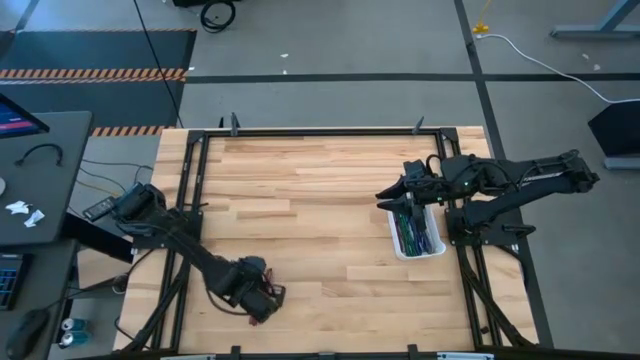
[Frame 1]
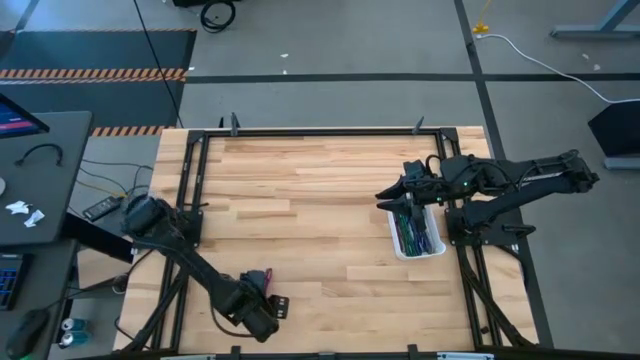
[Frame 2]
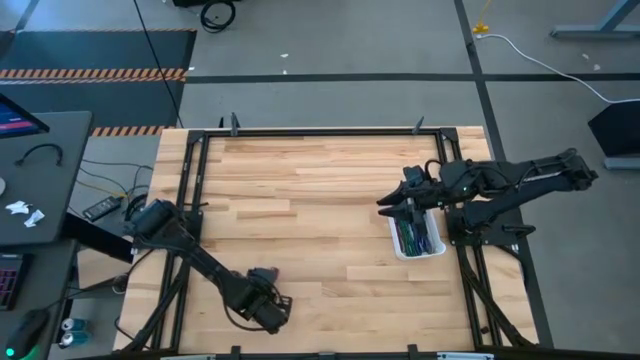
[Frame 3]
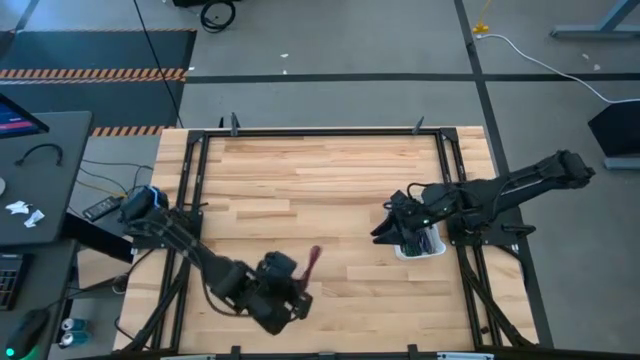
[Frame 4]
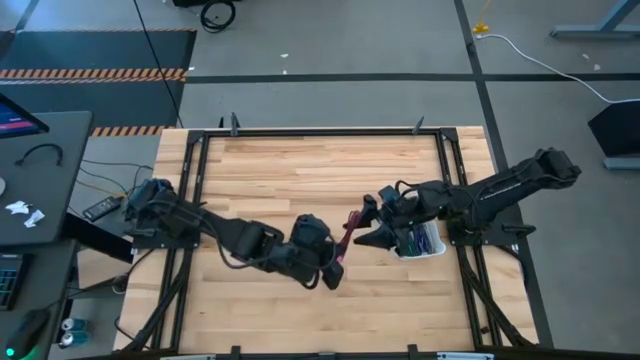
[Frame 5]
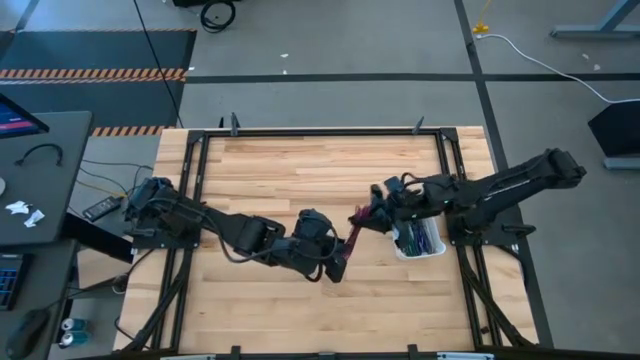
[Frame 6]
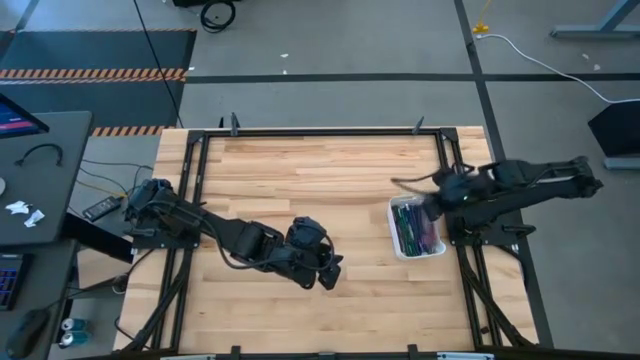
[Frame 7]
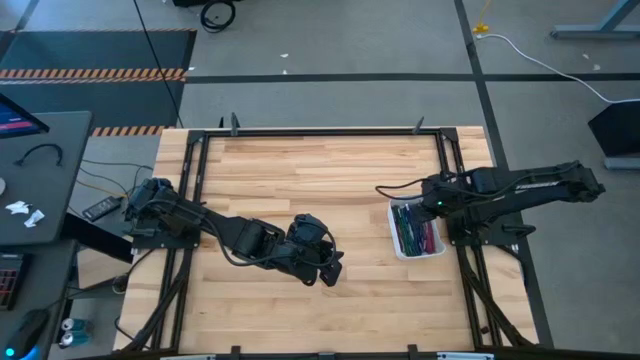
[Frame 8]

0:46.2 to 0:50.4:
Task: Pick and place USB-C Cables
Put the red charging cable into the white bin

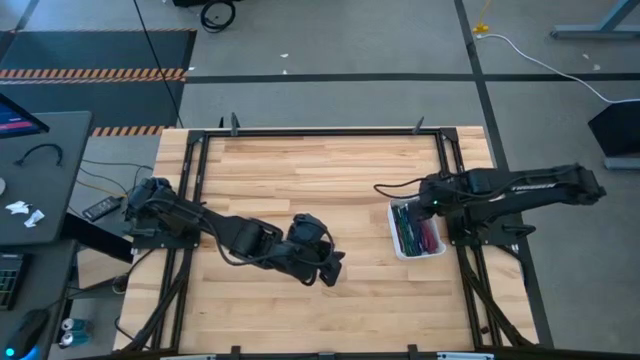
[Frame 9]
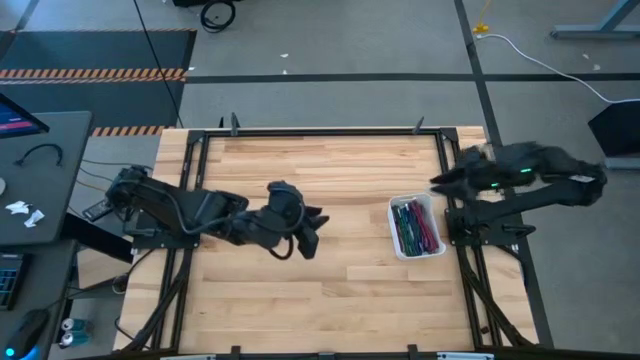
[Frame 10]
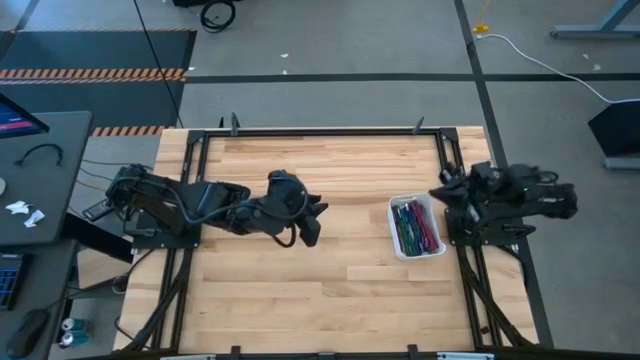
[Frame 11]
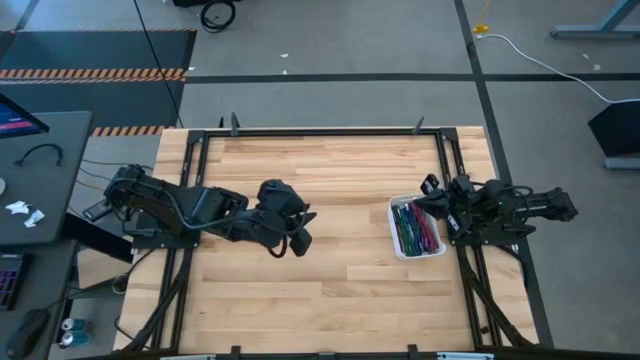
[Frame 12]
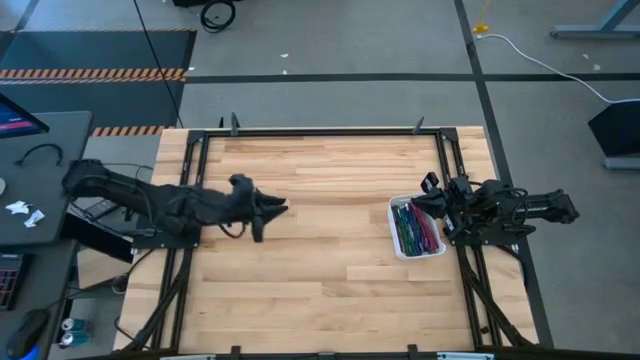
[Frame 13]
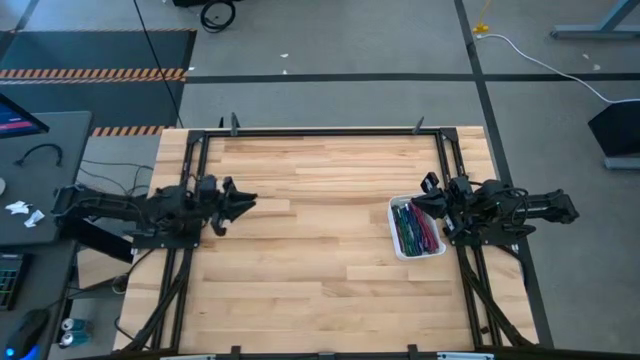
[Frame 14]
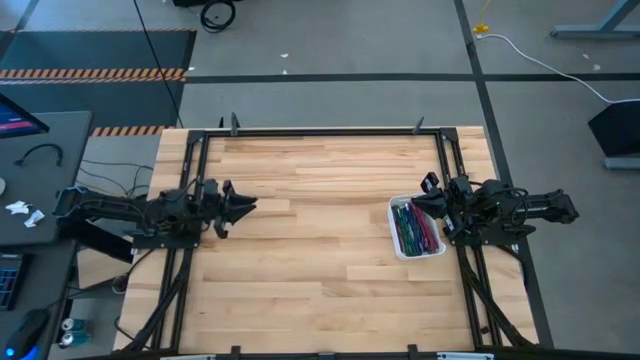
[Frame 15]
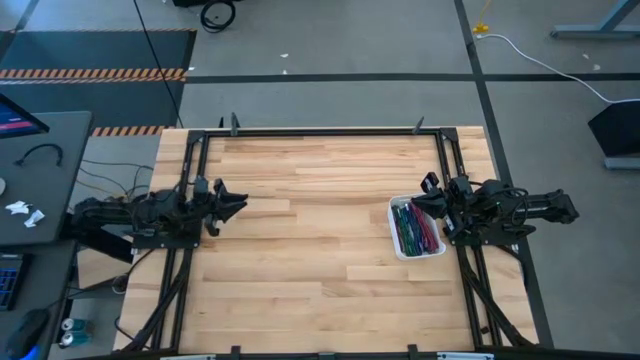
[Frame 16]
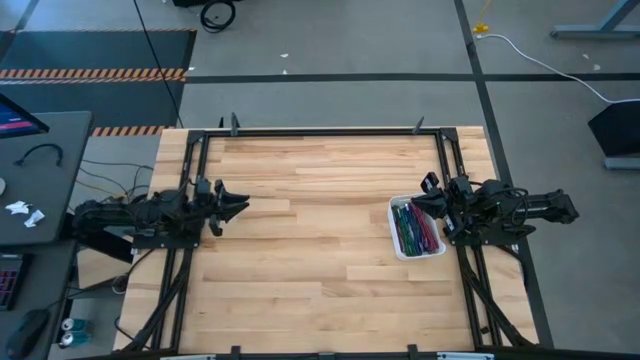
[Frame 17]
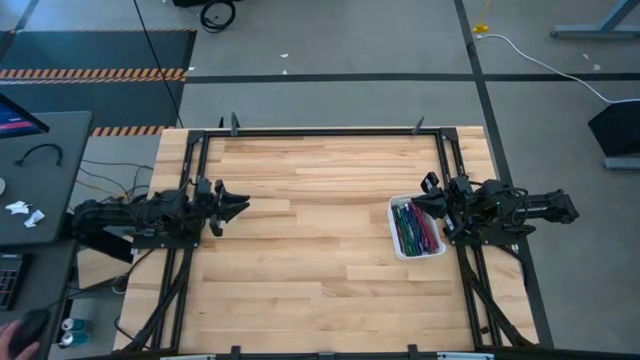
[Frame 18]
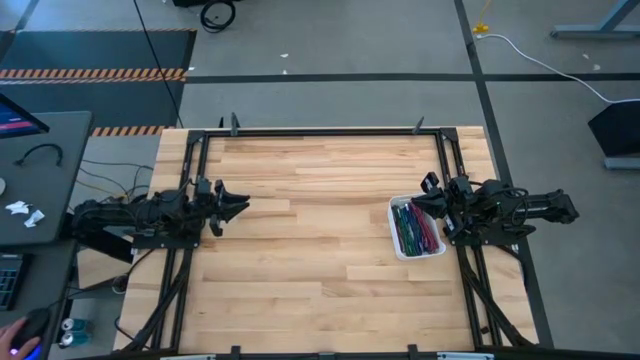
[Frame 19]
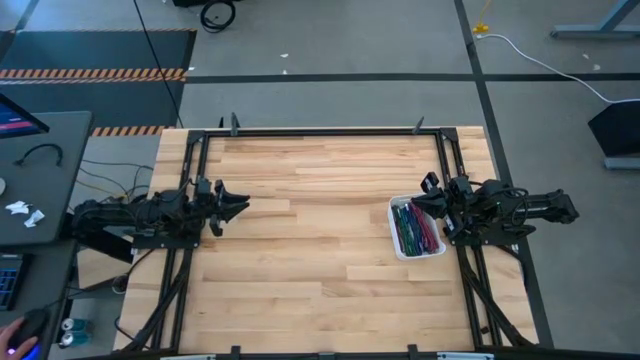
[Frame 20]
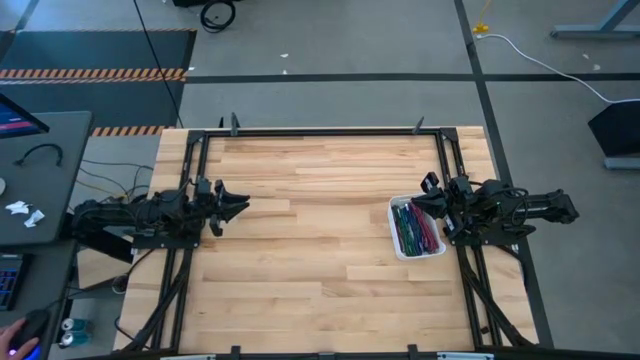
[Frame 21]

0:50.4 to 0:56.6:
Return to Home Position

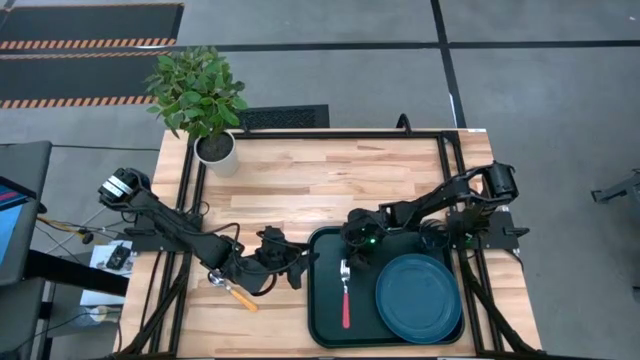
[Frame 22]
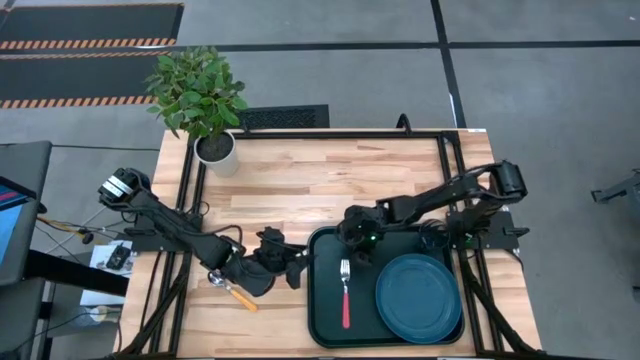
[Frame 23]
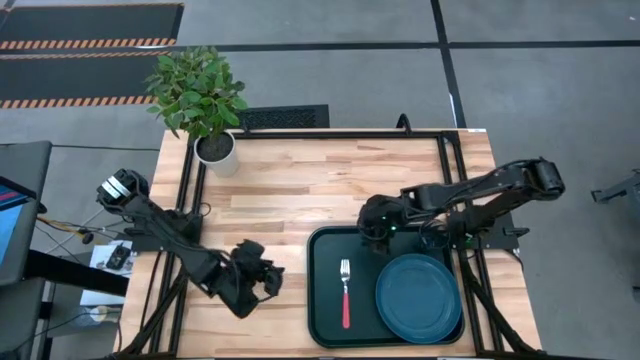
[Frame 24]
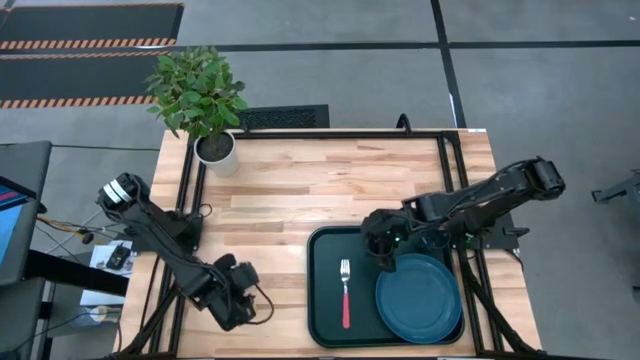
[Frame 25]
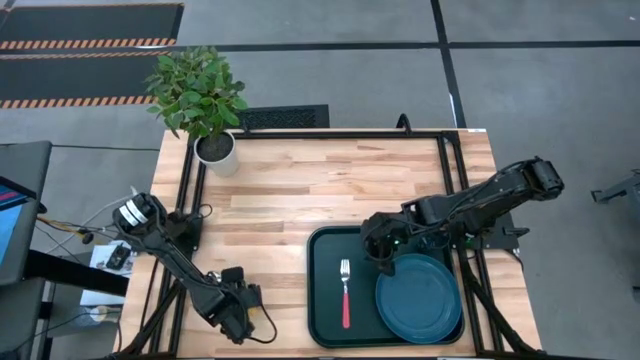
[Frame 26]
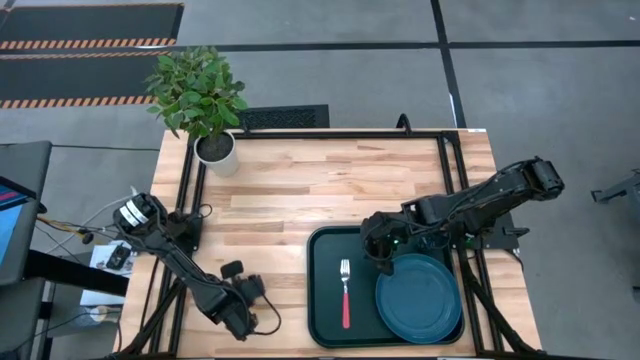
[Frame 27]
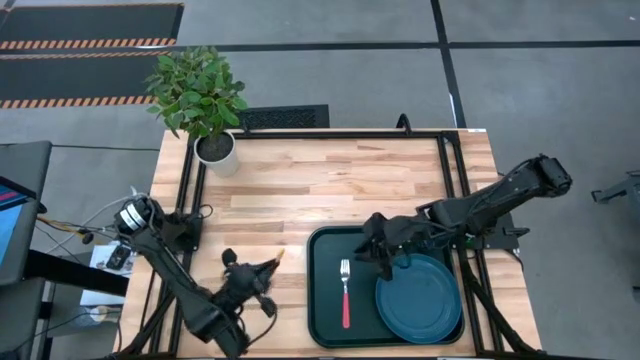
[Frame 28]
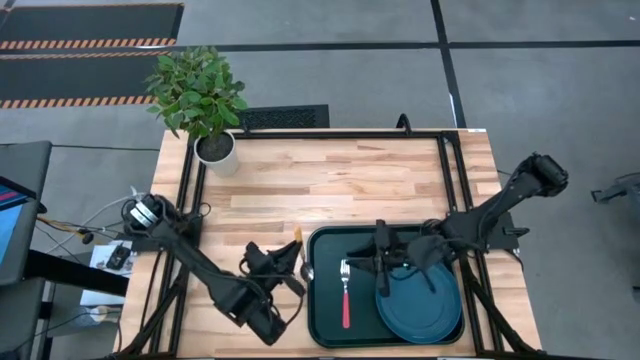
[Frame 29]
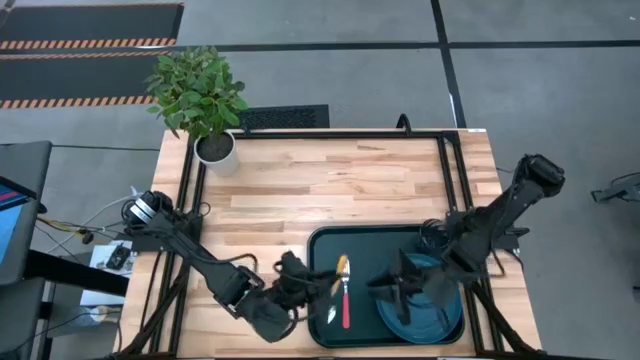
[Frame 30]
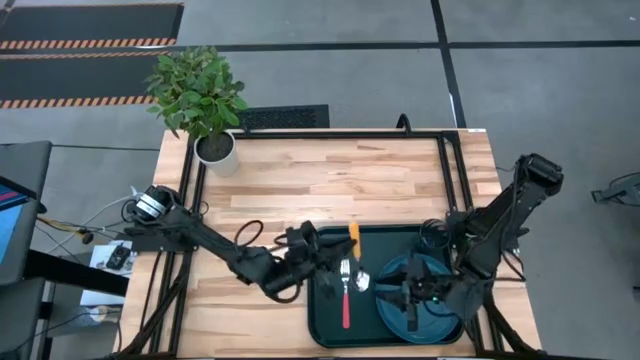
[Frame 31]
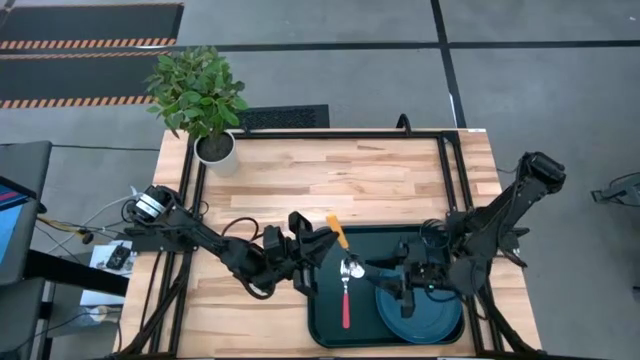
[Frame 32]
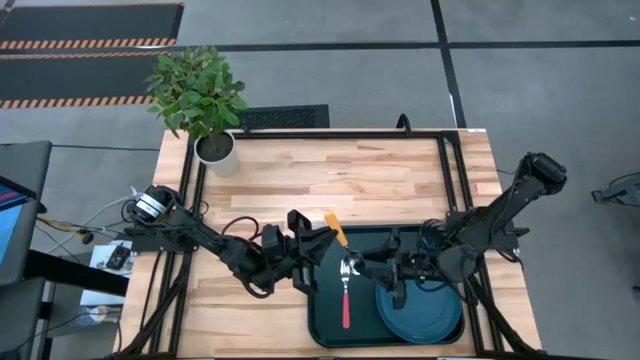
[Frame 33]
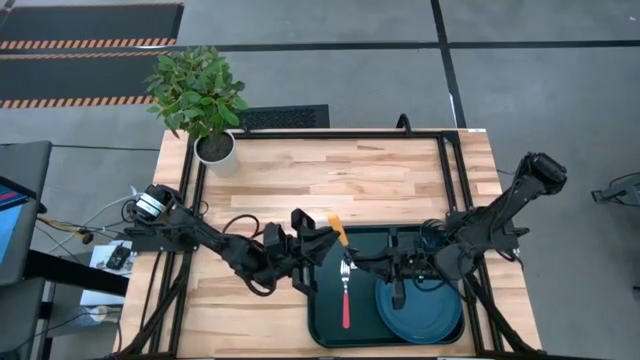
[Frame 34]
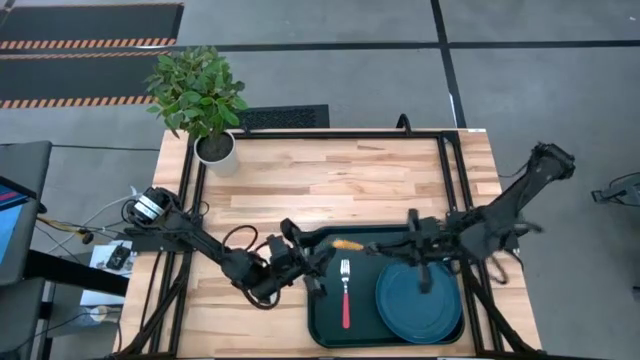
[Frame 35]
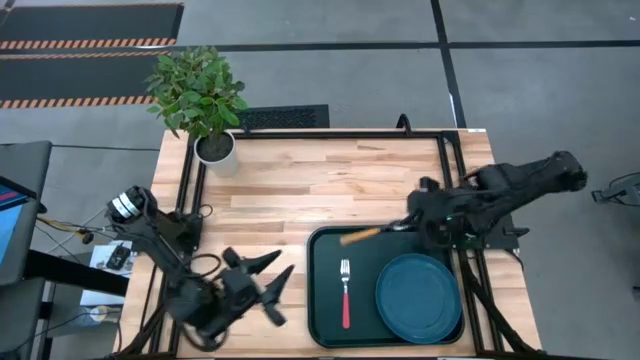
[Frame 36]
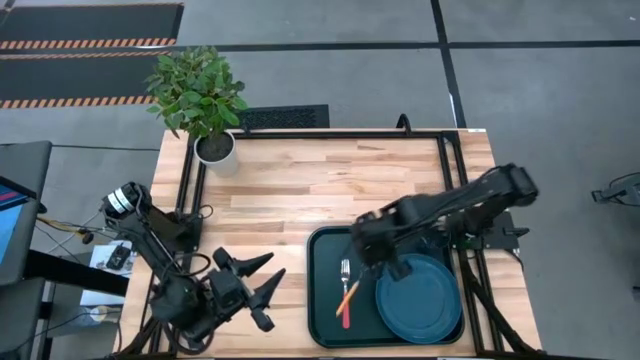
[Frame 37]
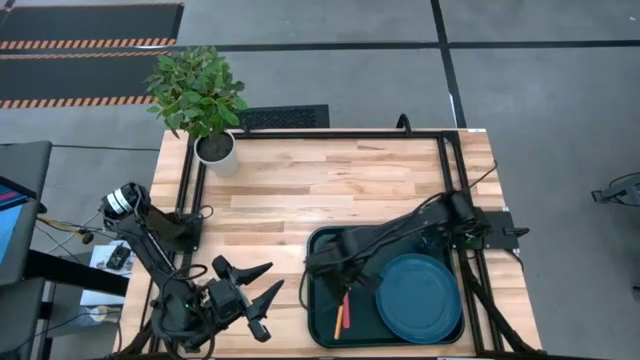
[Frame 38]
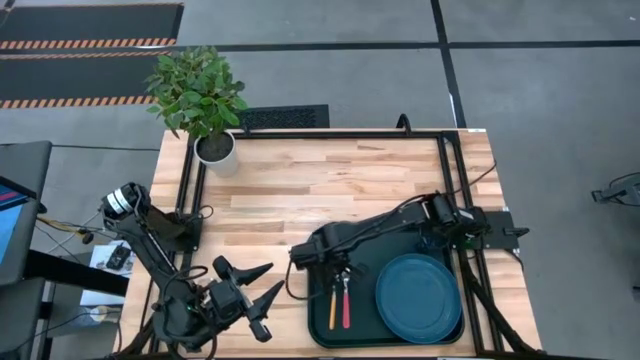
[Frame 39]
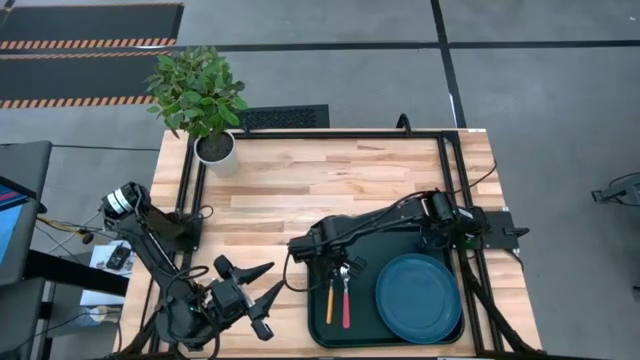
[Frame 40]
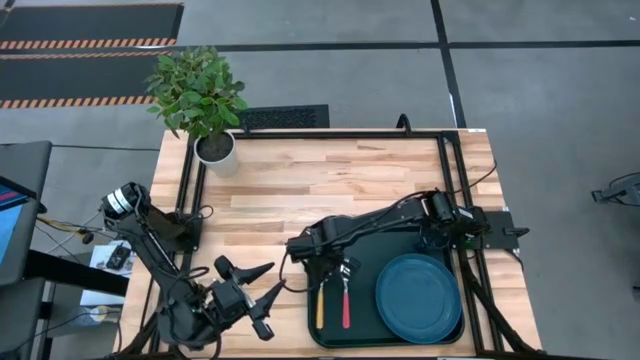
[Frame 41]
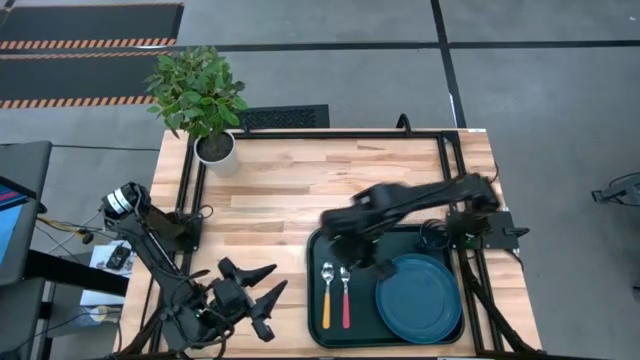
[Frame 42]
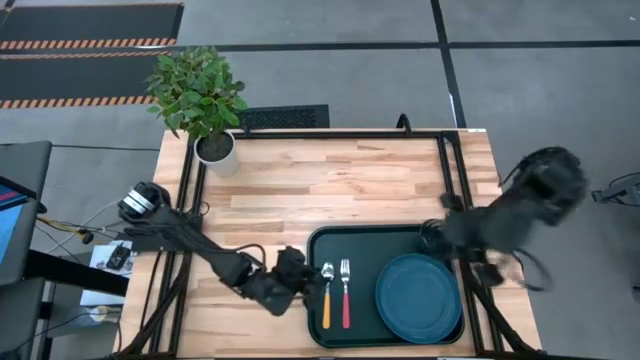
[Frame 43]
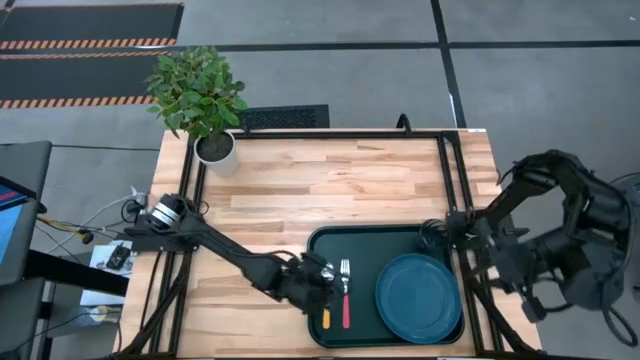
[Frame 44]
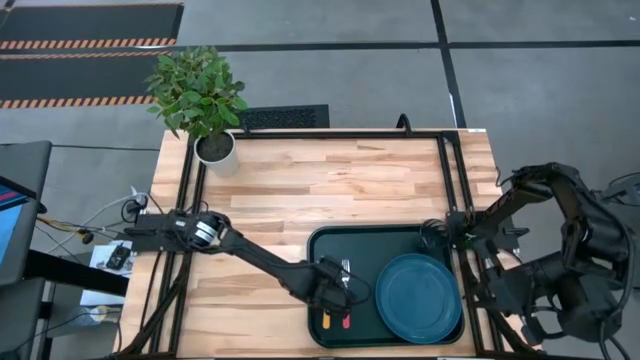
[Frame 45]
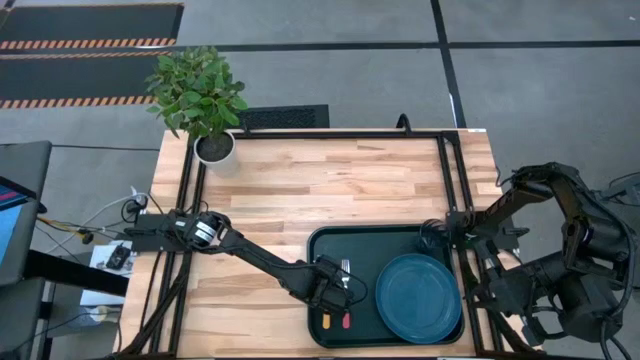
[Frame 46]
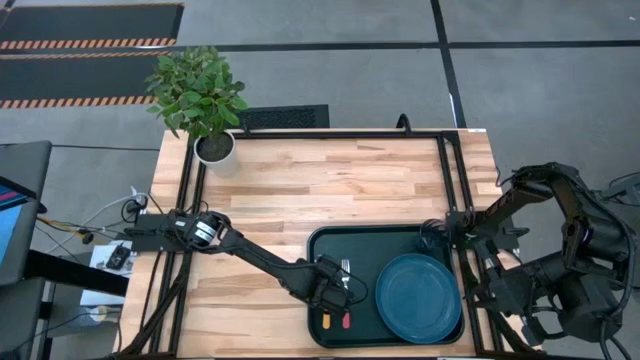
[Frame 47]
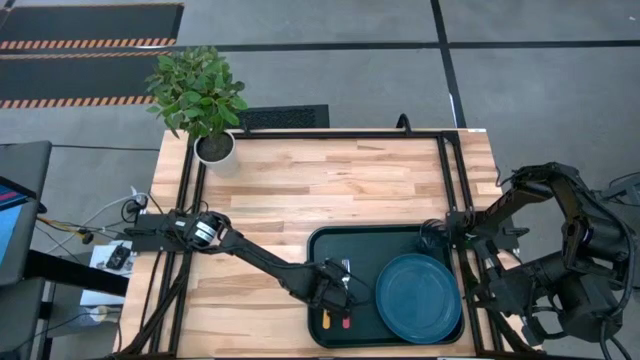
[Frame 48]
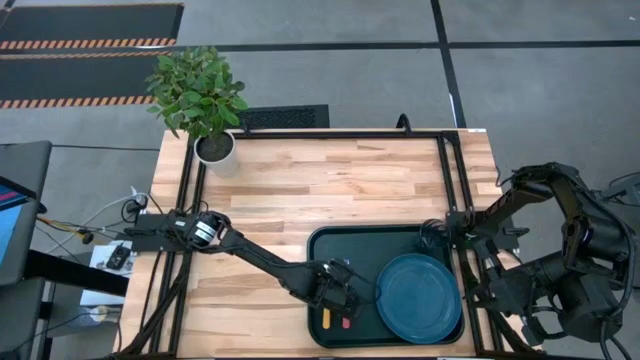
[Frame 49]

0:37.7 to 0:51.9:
Task: Pick and place plate/cup/fork/spoon on tray
Put the yellow spoon on the black tray
